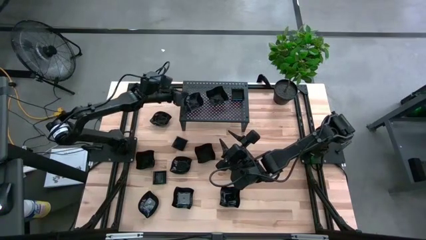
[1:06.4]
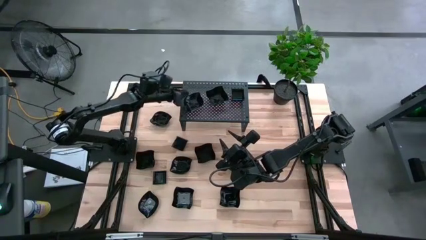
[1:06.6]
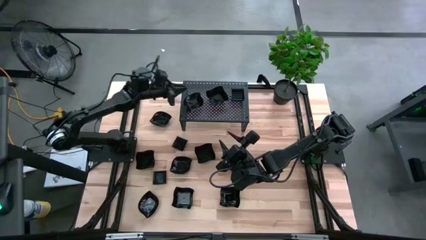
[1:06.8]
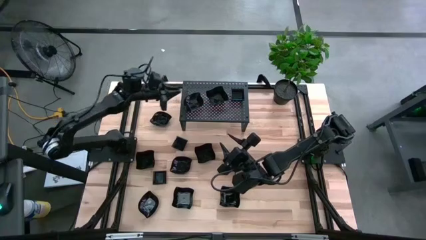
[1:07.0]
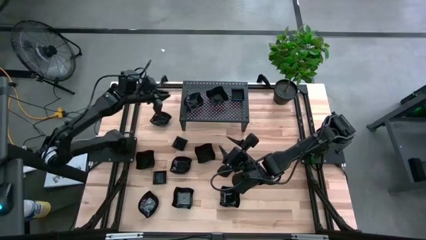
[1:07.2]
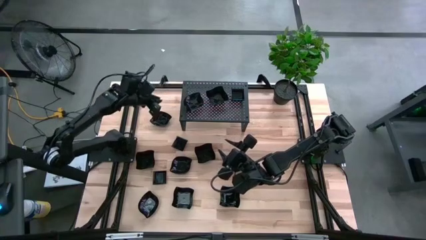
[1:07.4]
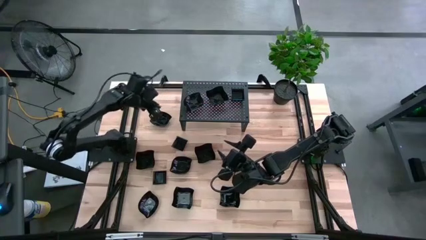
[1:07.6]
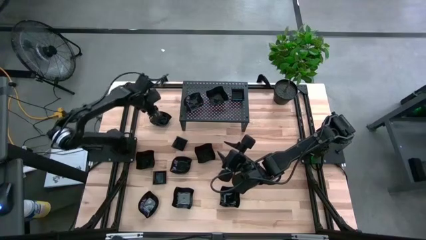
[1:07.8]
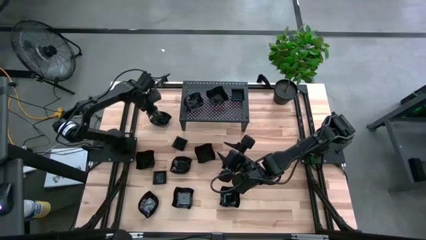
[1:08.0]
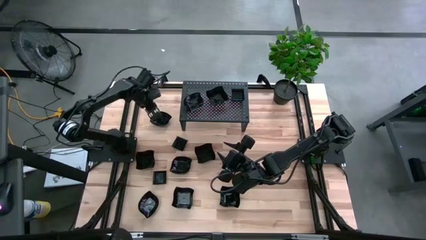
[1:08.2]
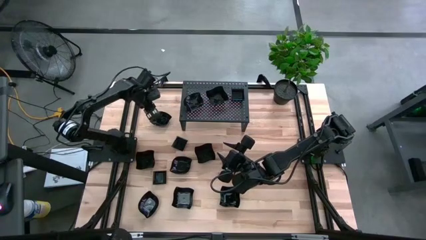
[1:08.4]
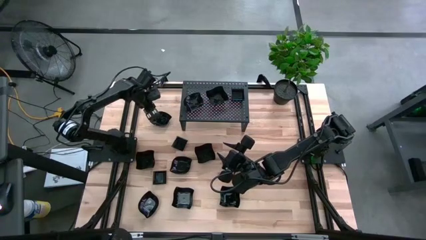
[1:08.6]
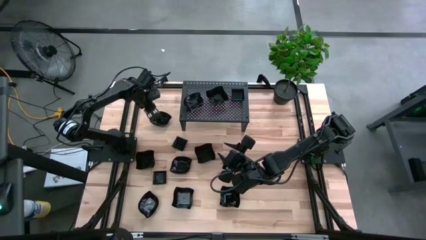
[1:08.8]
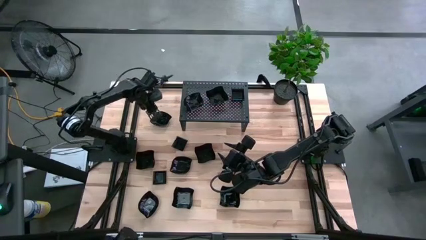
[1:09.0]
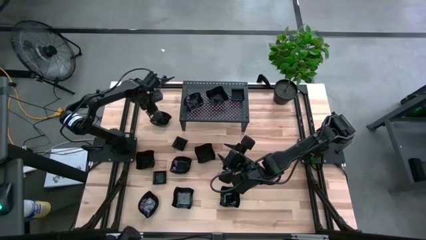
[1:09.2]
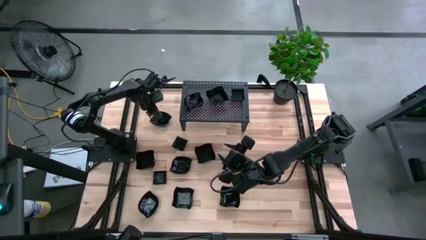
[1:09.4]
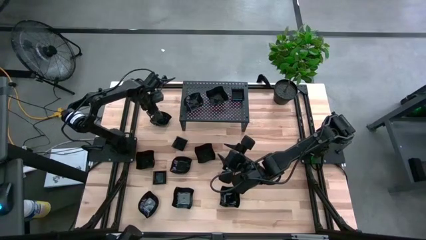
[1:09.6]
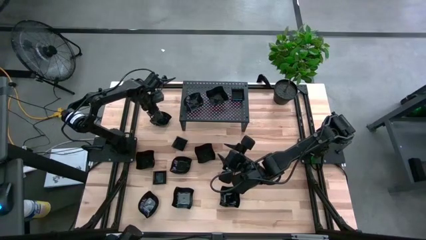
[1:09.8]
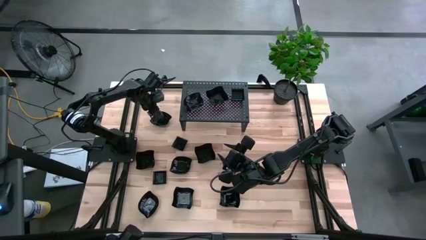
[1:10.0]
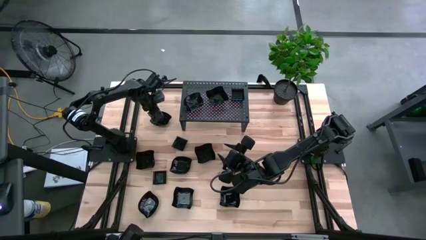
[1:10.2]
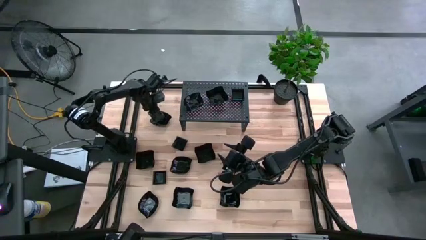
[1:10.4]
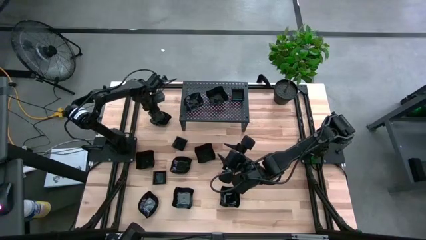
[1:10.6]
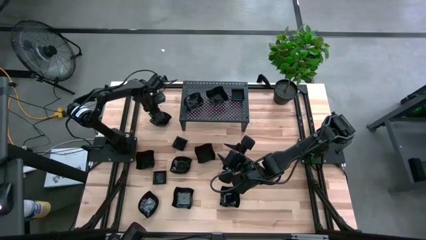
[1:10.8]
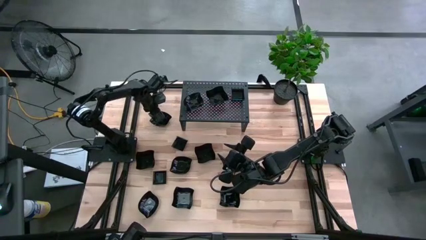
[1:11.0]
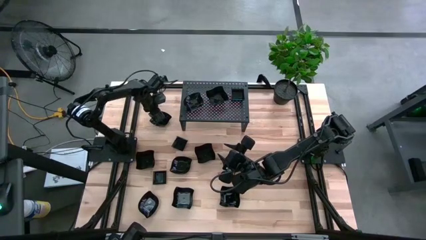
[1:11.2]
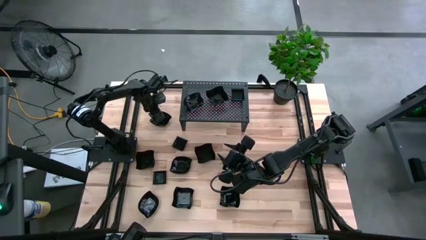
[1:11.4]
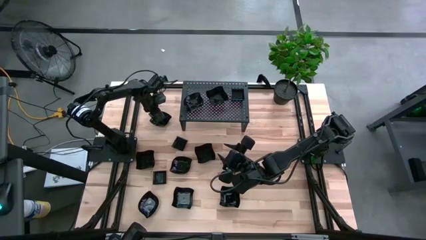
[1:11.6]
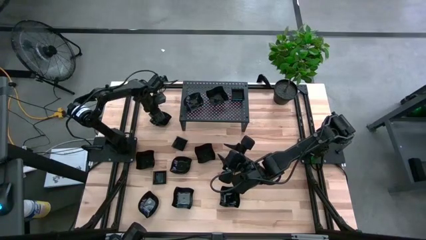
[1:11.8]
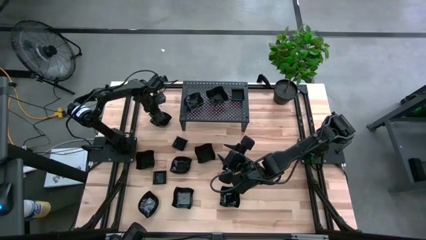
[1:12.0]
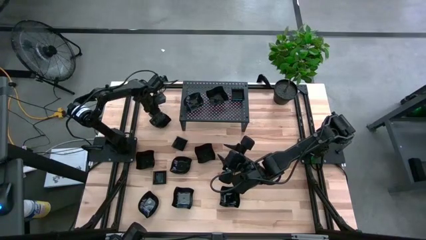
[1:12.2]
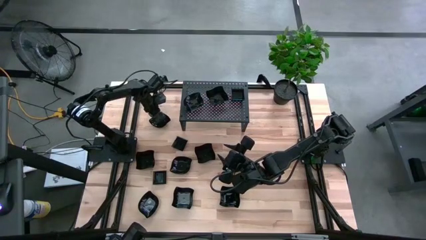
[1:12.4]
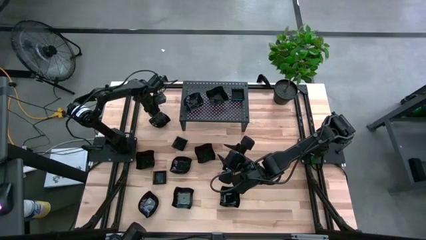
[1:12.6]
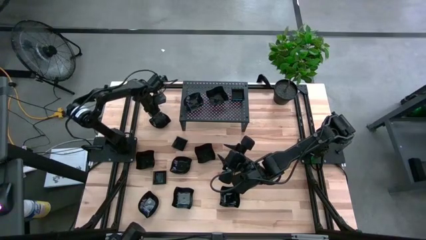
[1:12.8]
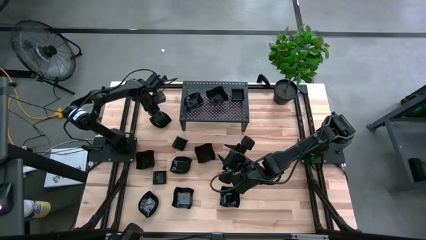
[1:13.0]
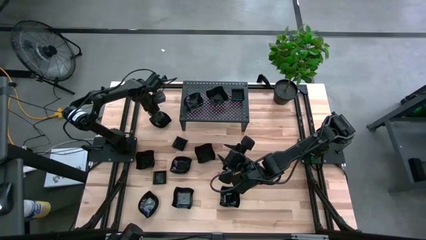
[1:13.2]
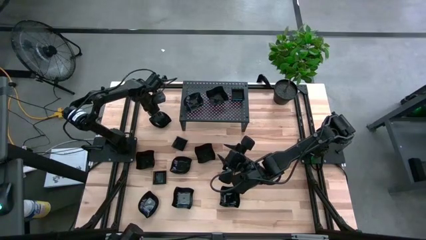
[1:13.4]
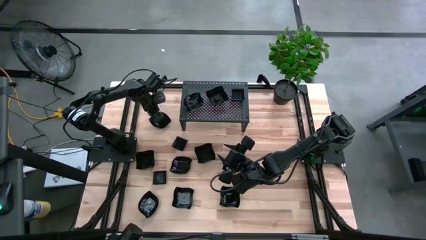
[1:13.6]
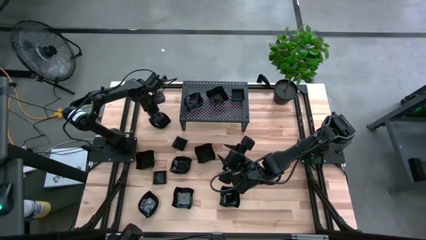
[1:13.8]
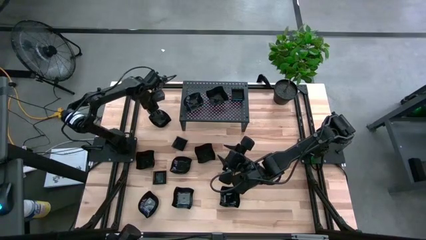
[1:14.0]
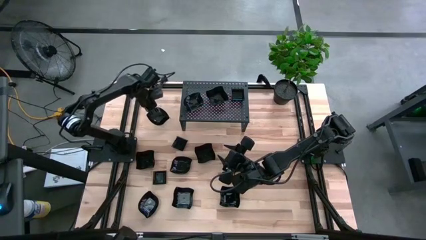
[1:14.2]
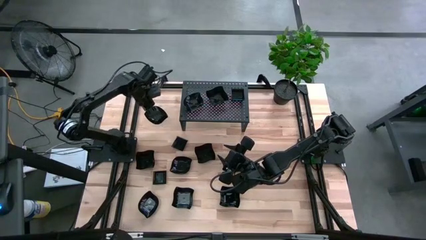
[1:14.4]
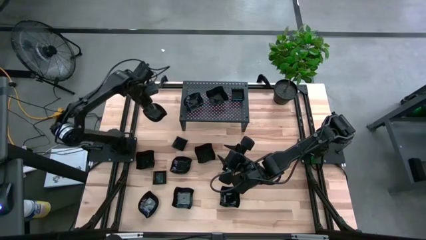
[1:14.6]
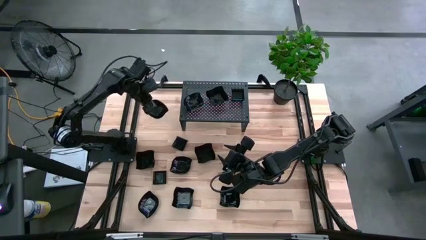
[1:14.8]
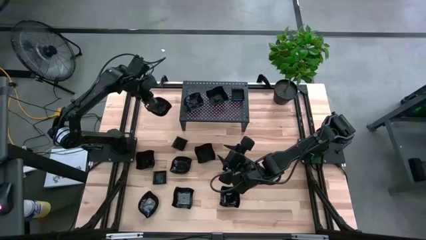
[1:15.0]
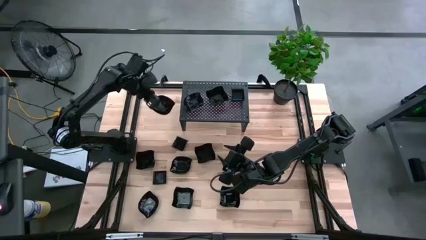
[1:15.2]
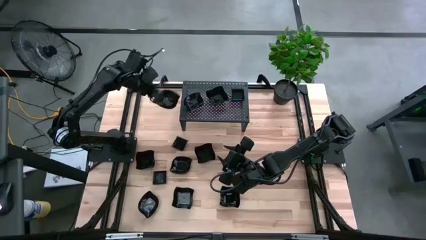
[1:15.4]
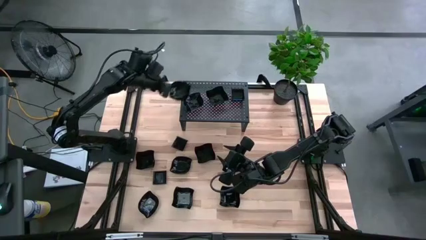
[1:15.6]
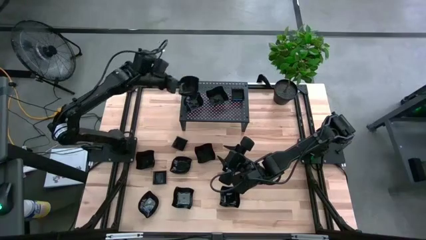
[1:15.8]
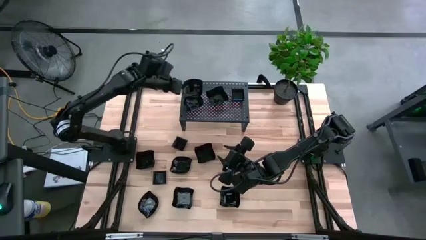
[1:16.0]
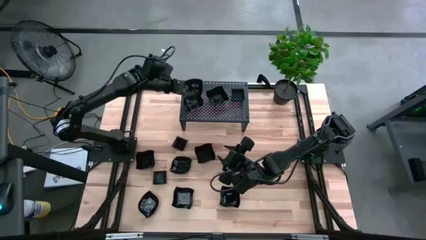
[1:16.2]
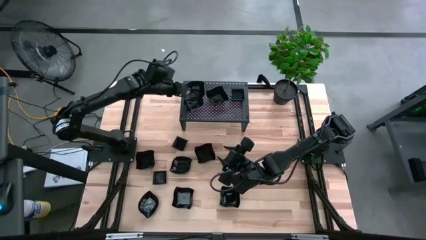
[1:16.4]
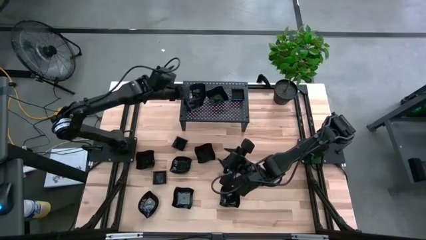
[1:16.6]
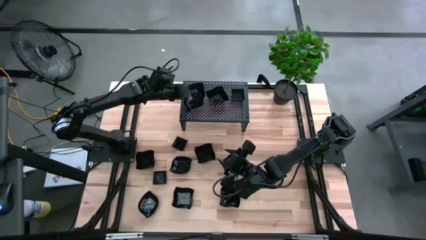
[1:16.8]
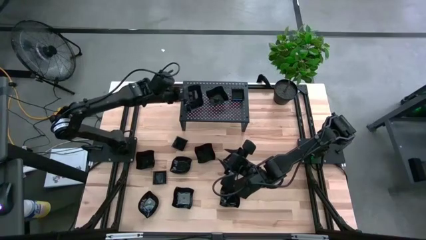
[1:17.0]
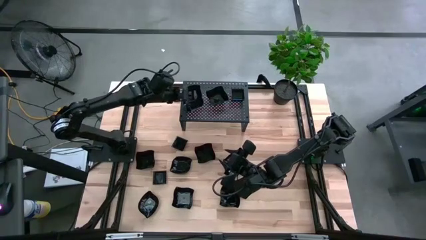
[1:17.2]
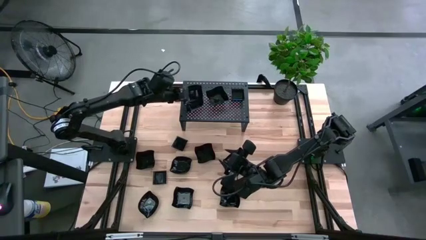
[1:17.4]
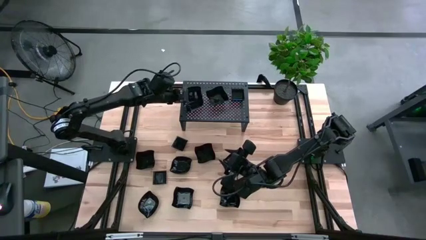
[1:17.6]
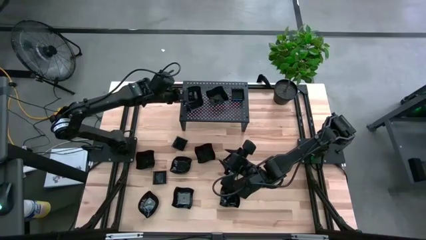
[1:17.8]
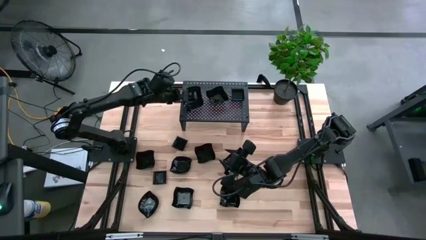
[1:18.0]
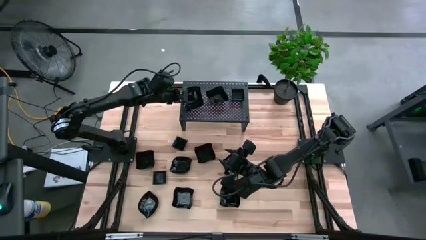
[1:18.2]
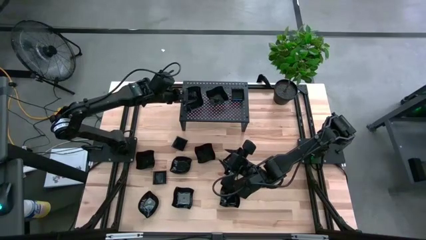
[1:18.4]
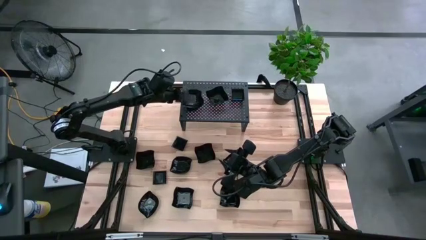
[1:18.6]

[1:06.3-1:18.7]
Task: Pick & Place Mini shaped plates
Stack the leaf shaped plate on top of the leaf shaped plate on the shelf
